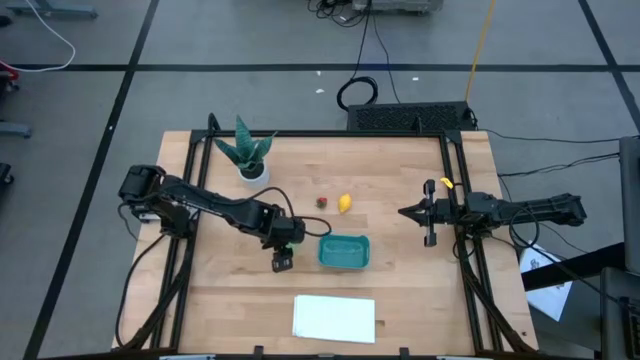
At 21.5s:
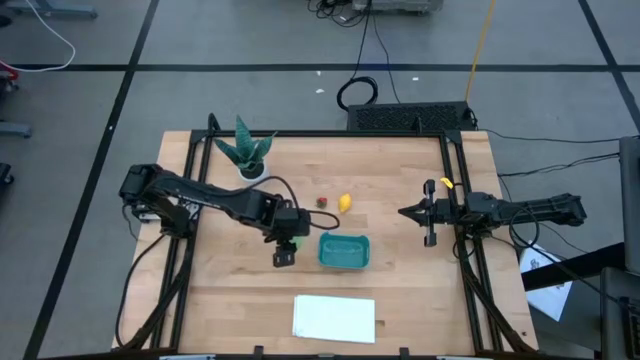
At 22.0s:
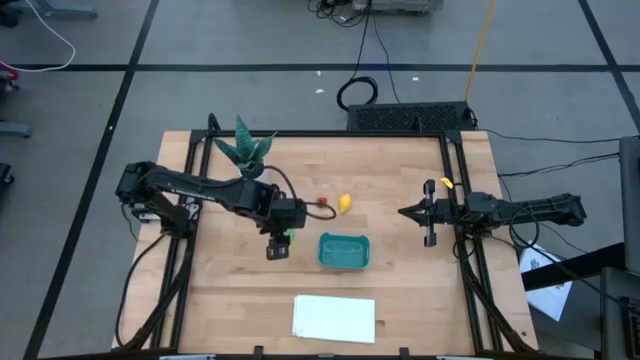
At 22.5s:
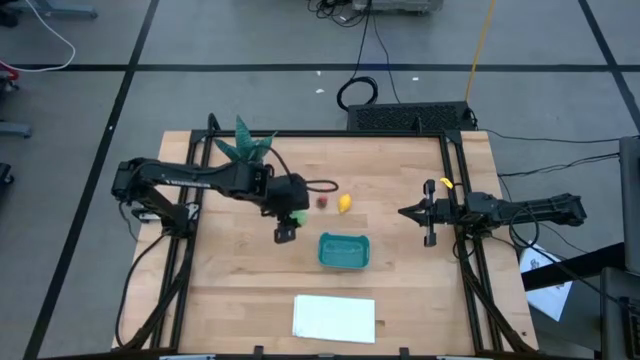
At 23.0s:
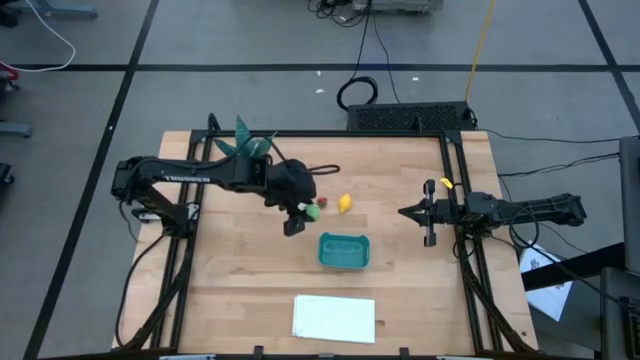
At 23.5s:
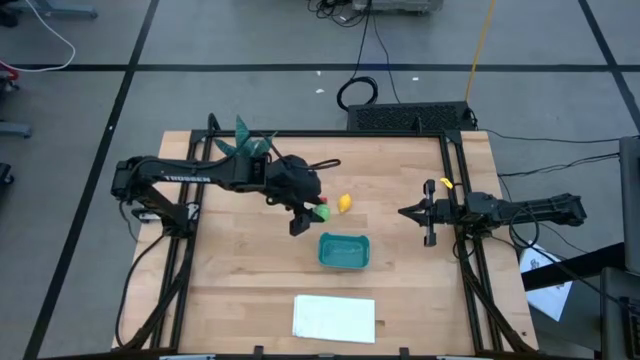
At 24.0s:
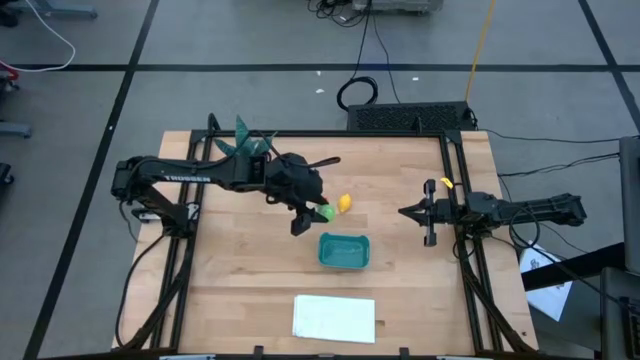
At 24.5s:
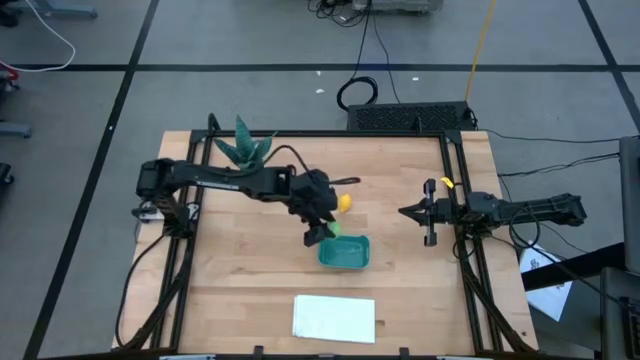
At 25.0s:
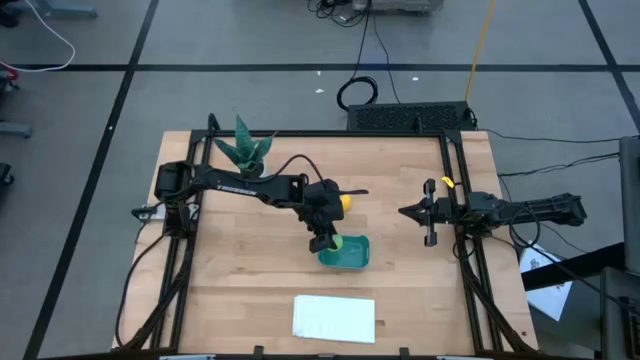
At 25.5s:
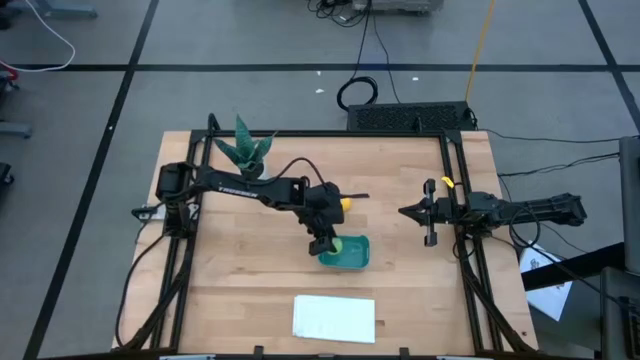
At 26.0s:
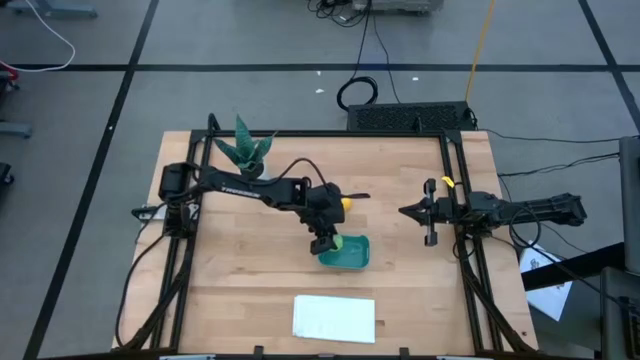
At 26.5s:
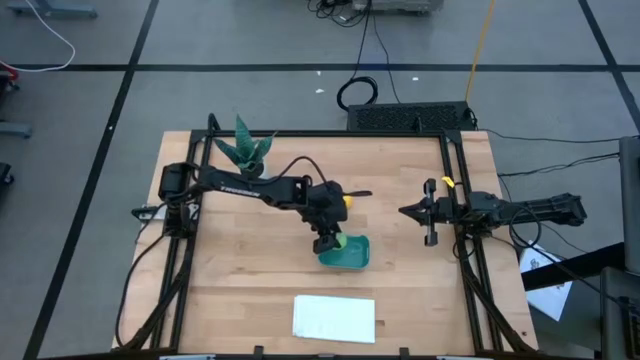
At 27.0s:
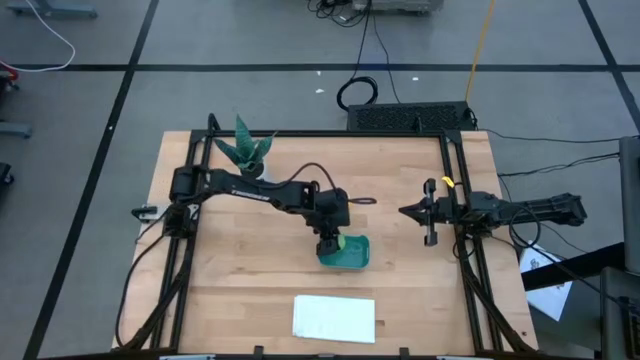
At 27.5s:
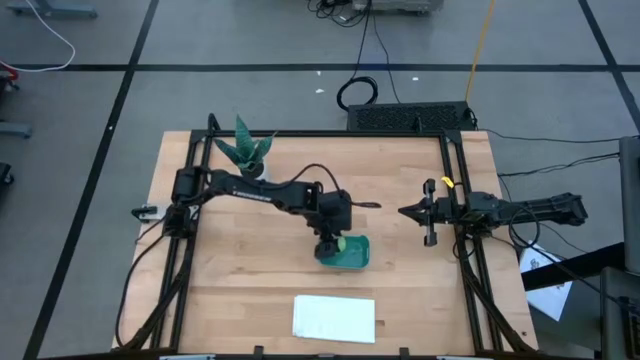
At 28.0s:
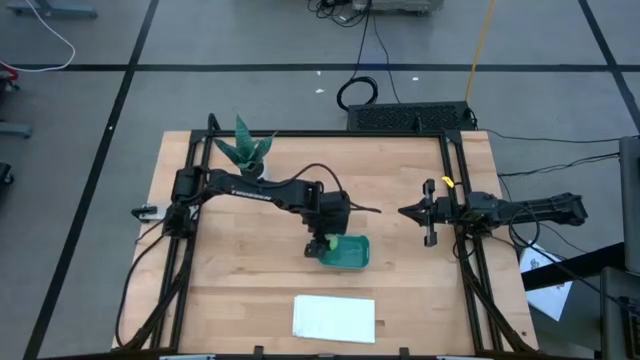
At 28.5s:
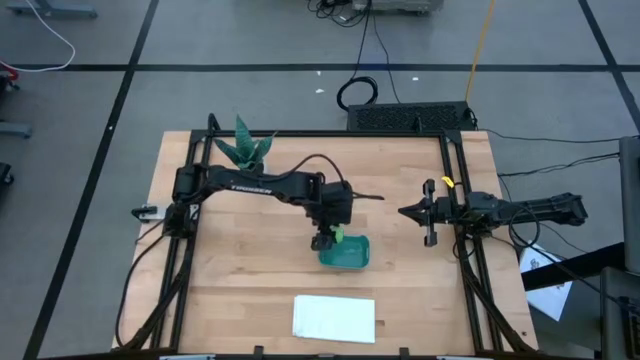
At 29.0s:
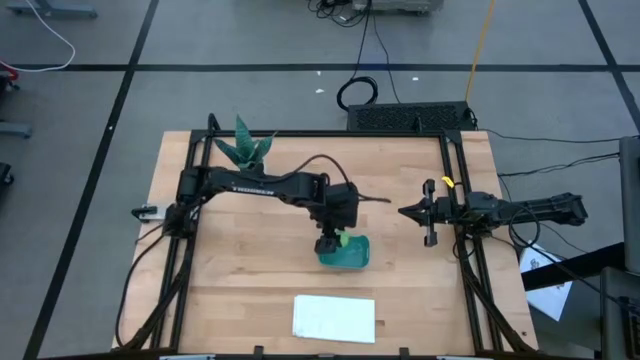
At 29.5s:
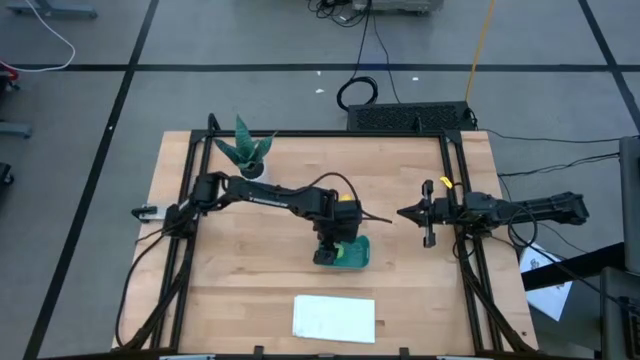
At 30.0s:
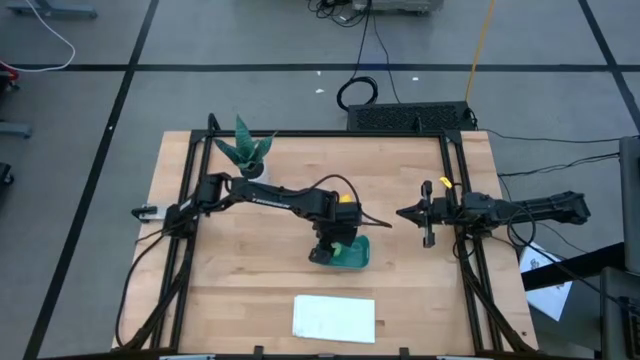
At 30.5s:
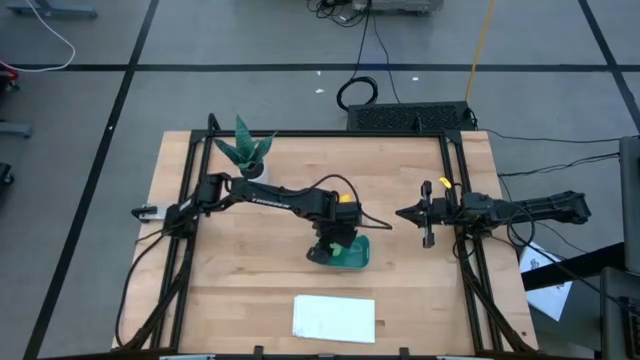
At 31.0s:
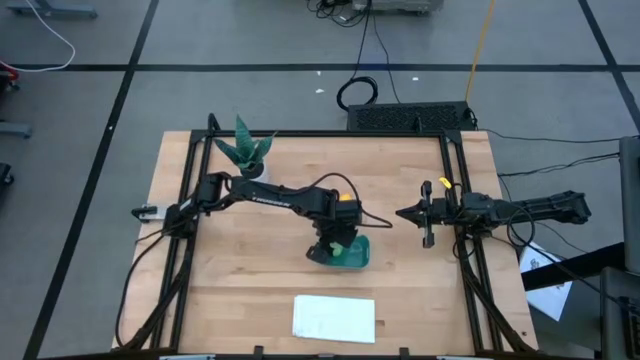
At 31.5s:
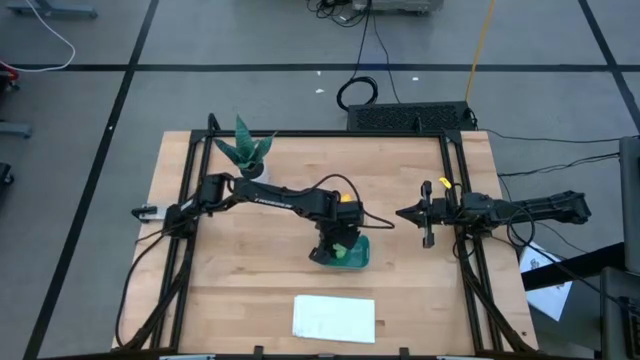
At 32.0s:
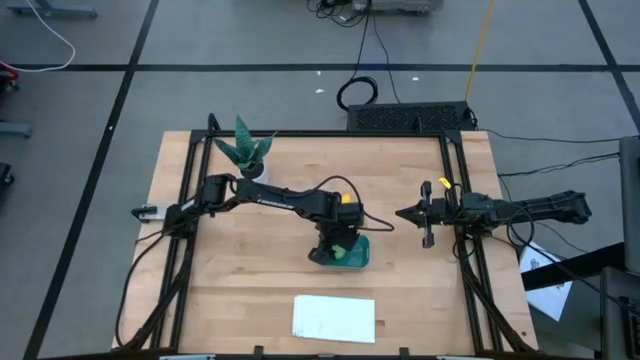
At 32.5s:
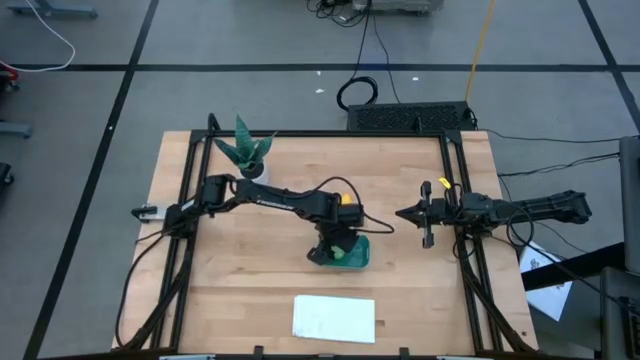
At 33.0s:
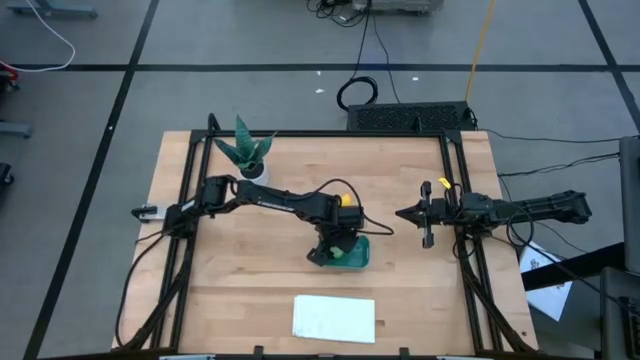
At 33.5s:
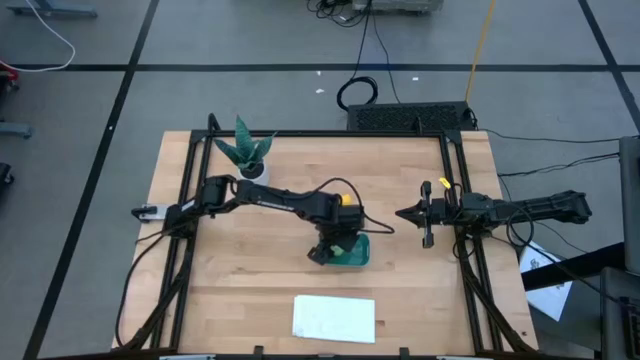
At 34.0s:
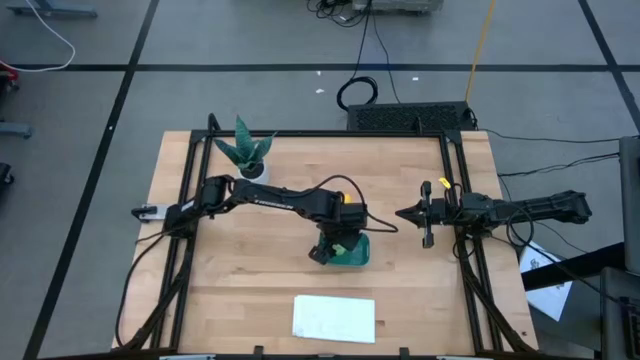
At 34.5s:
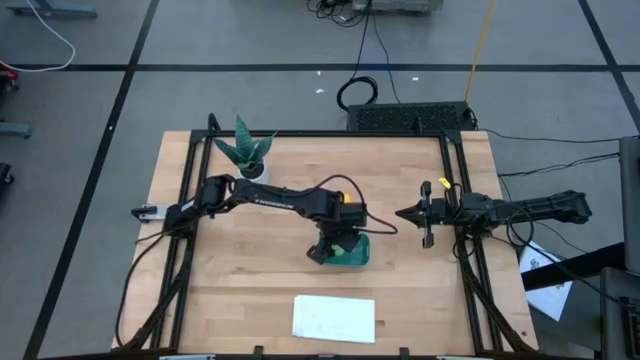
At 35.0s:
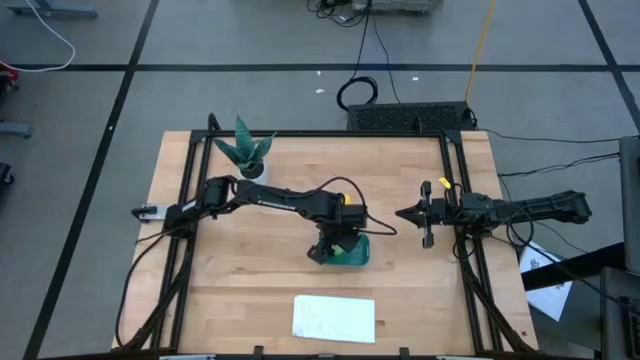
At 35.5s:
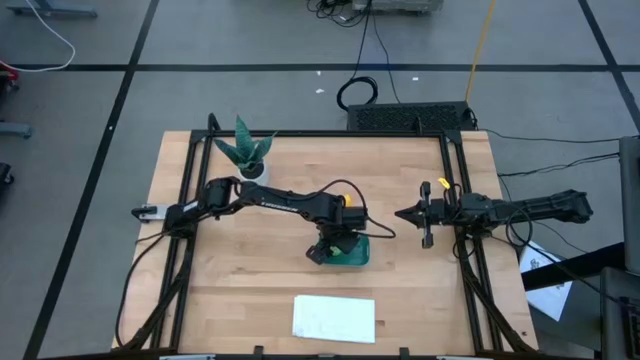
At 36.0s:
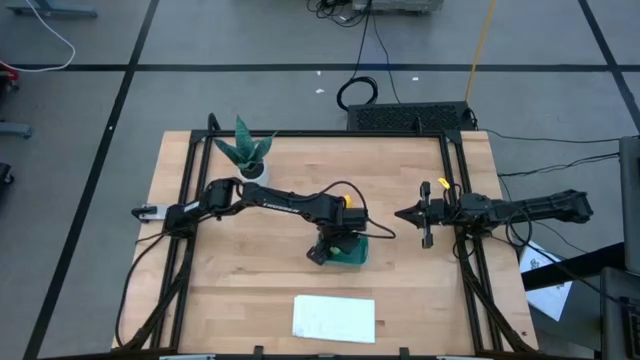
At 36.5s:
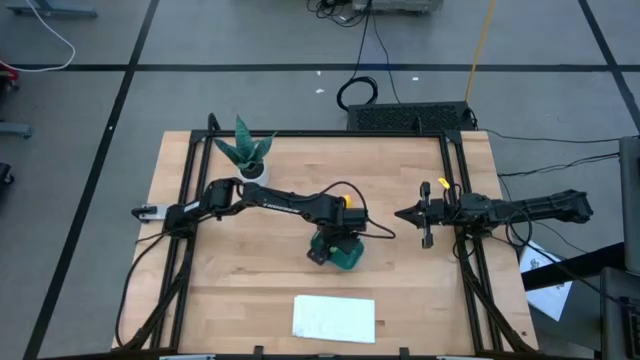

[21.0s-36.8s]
Task: Pick and placing Produce into tupperware
Put the cabbage into the blue bin

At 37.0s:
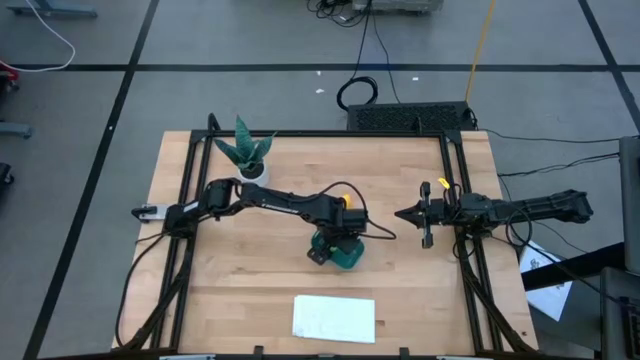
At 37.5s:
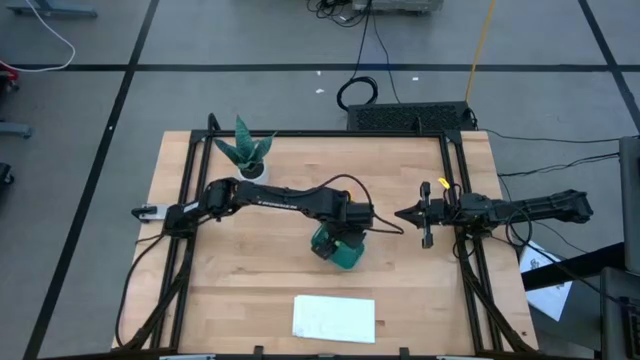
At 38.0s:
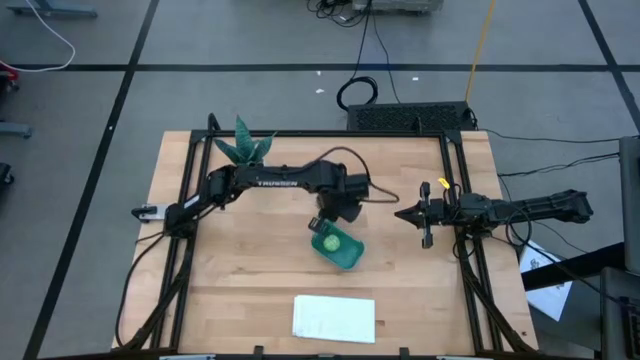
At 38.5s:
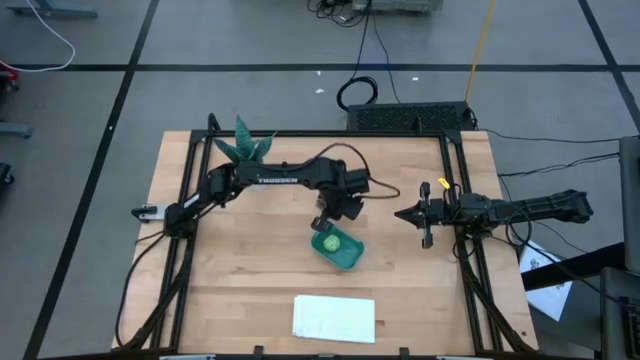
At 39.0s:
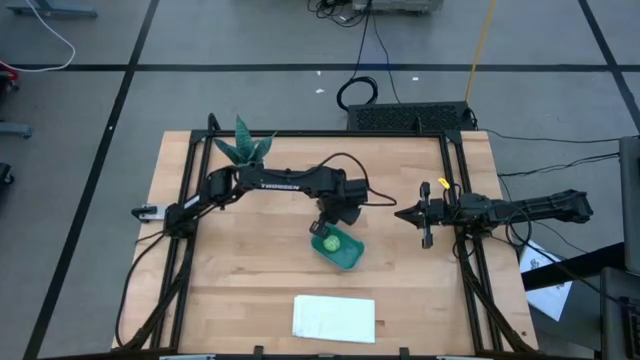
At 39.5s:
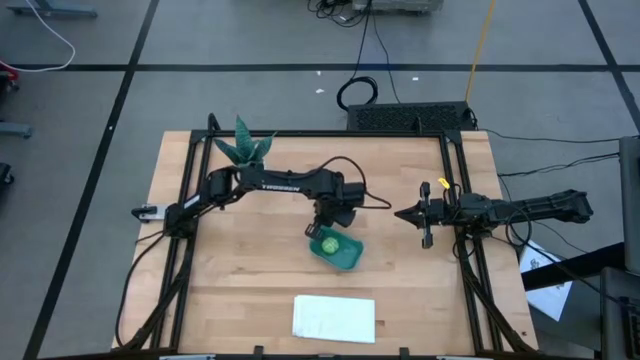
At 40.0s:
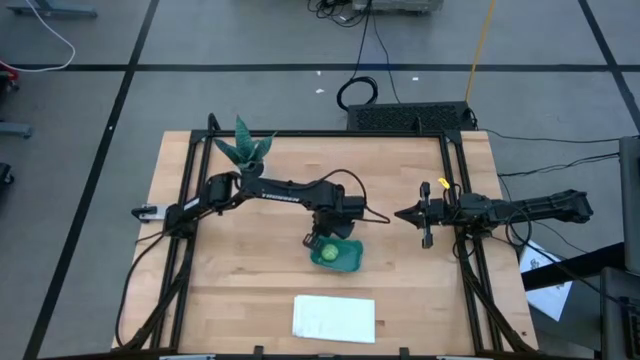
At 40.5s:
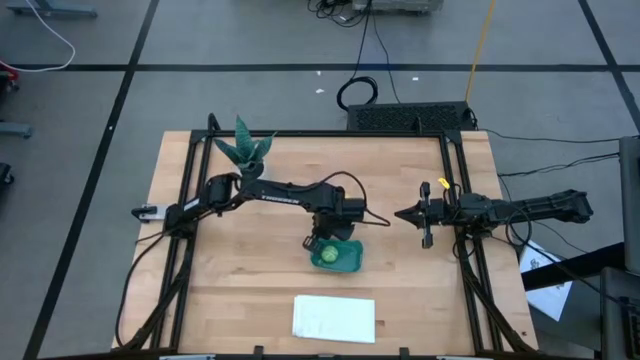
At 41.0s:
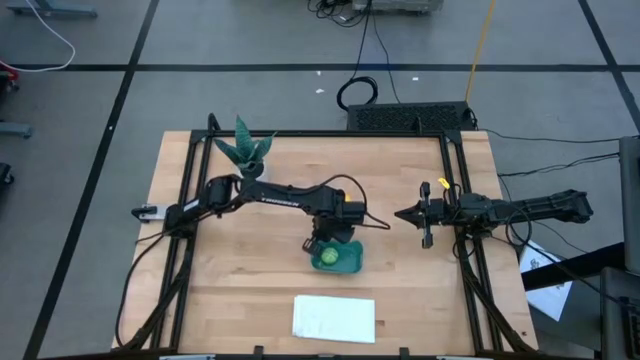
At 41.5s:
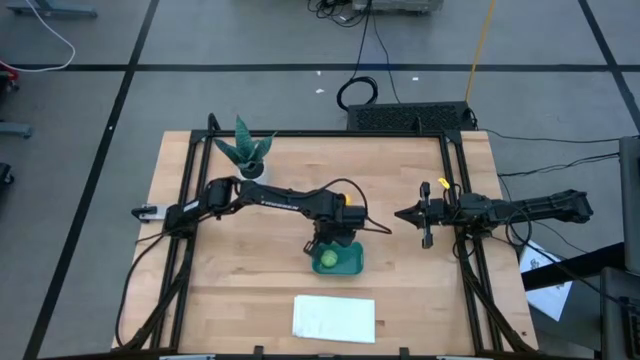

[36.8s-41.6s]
Adjust the blue bin
